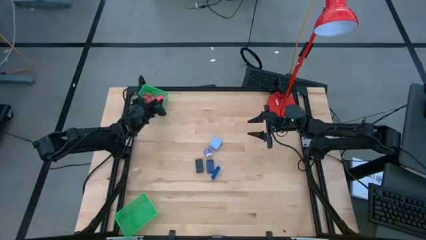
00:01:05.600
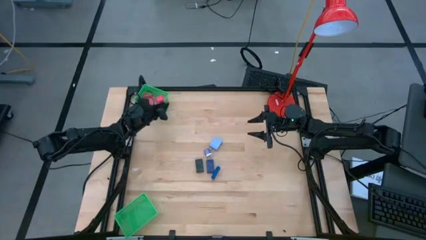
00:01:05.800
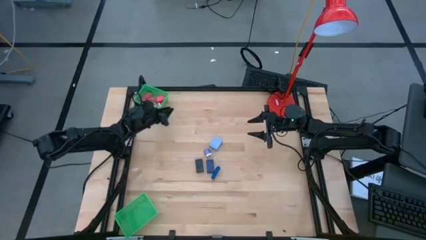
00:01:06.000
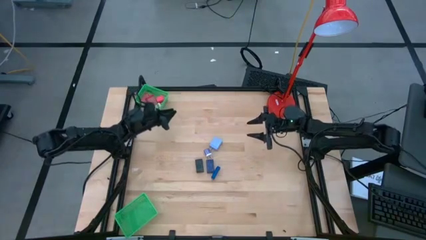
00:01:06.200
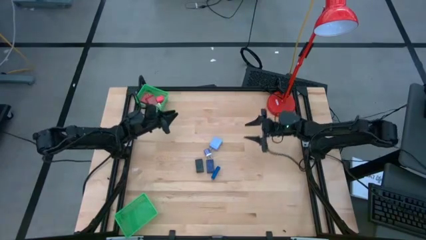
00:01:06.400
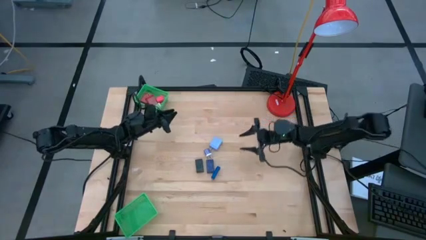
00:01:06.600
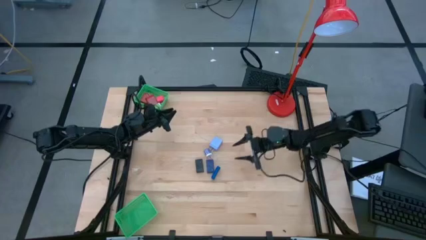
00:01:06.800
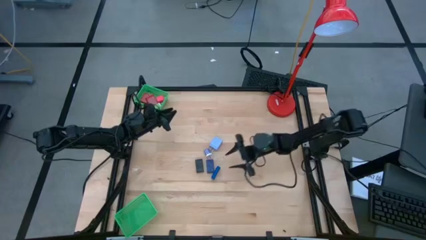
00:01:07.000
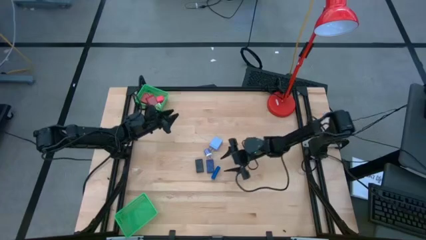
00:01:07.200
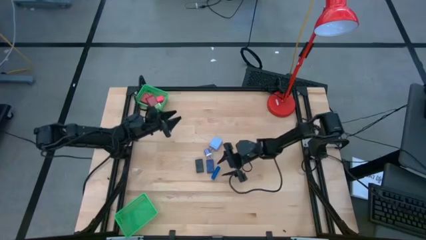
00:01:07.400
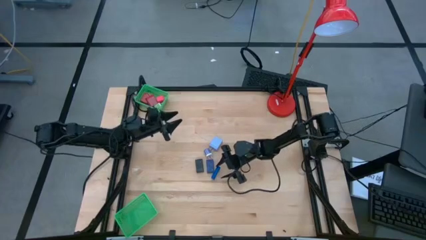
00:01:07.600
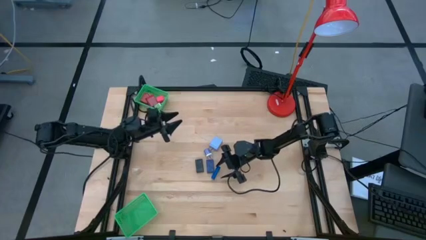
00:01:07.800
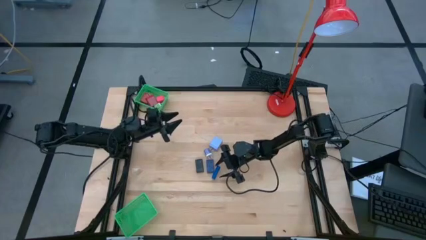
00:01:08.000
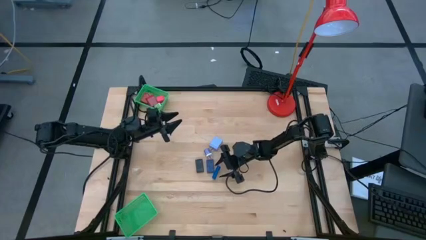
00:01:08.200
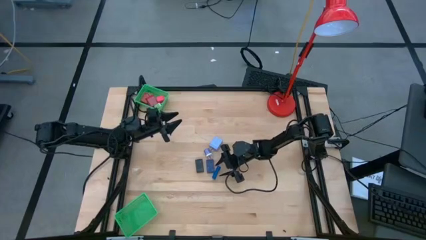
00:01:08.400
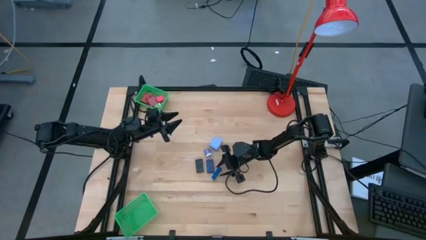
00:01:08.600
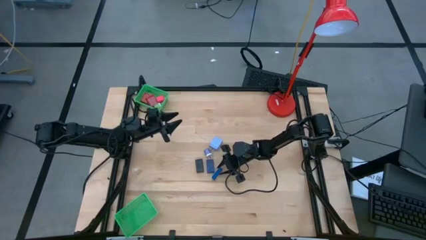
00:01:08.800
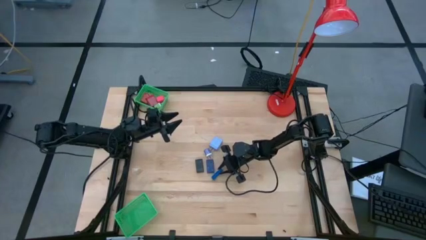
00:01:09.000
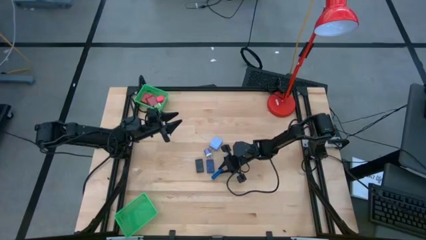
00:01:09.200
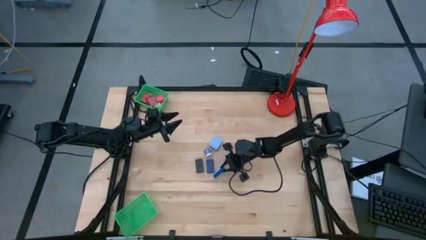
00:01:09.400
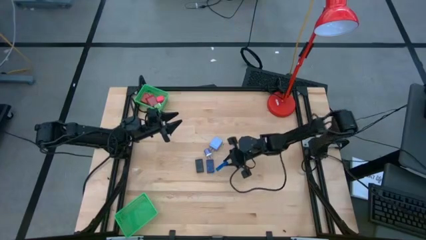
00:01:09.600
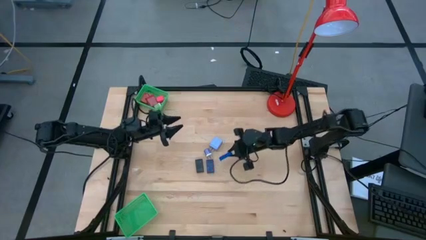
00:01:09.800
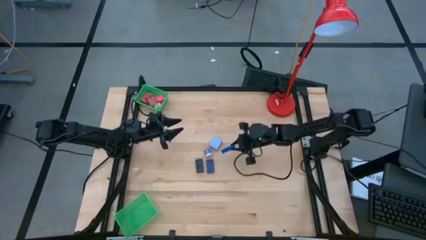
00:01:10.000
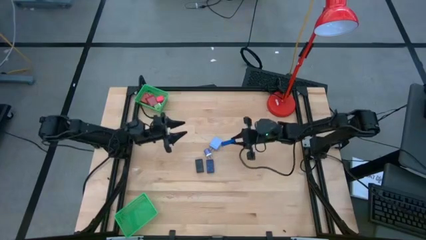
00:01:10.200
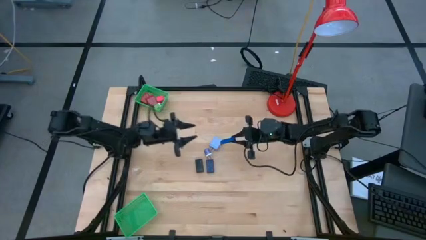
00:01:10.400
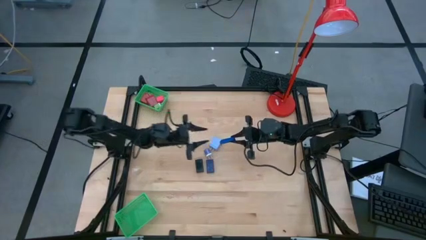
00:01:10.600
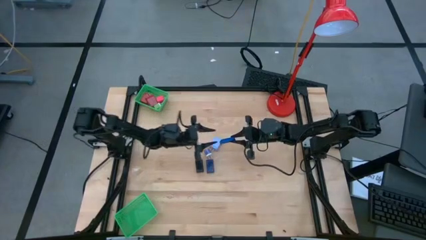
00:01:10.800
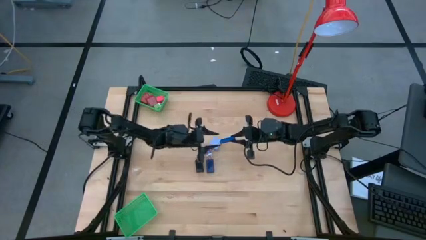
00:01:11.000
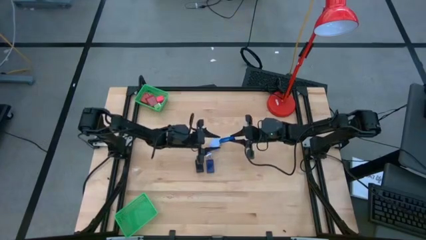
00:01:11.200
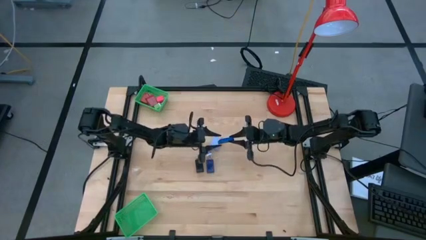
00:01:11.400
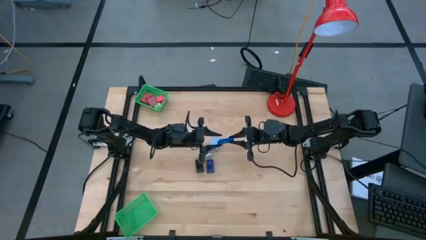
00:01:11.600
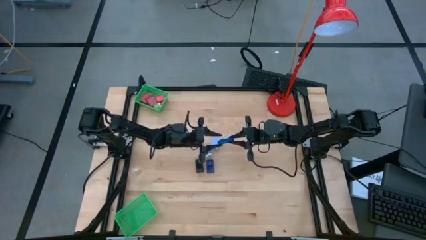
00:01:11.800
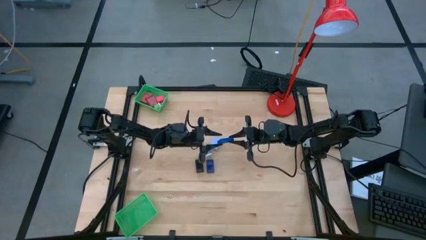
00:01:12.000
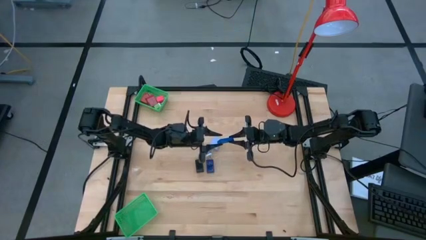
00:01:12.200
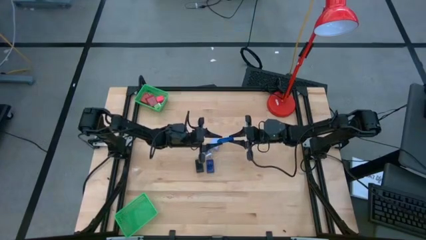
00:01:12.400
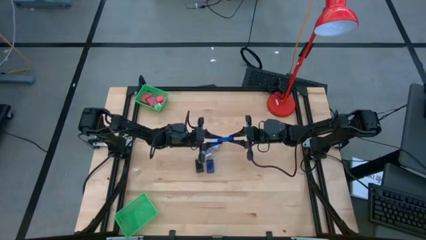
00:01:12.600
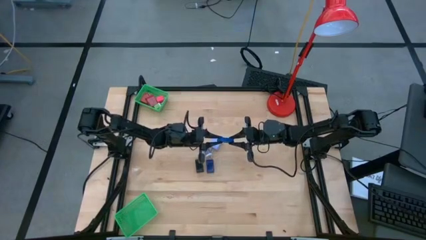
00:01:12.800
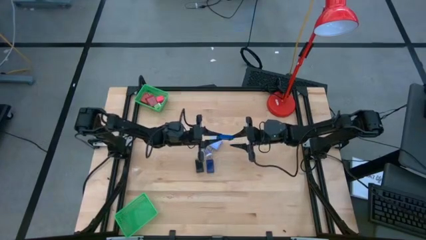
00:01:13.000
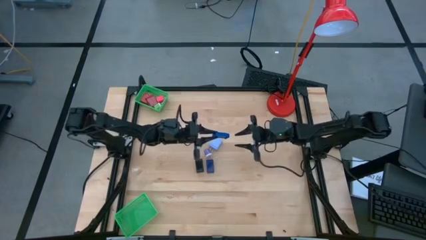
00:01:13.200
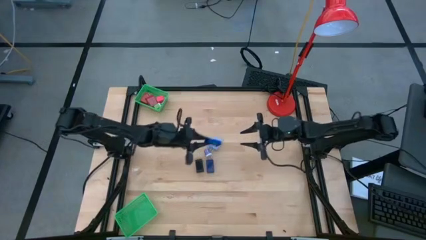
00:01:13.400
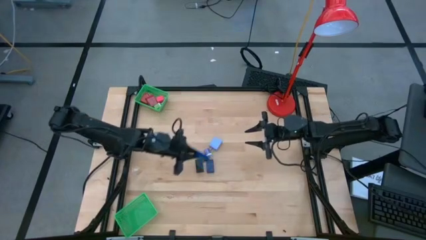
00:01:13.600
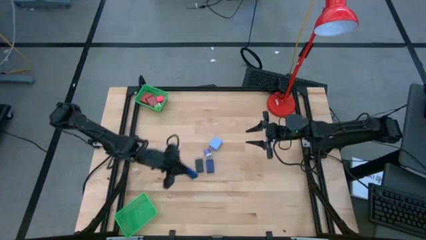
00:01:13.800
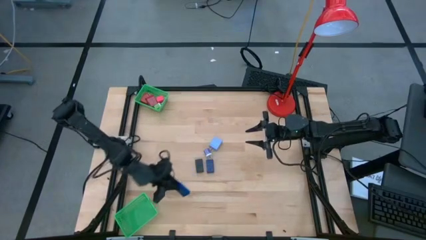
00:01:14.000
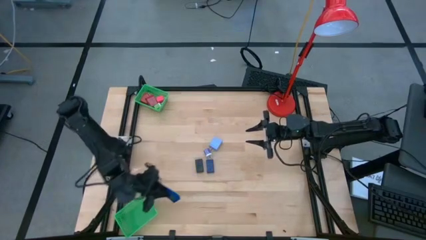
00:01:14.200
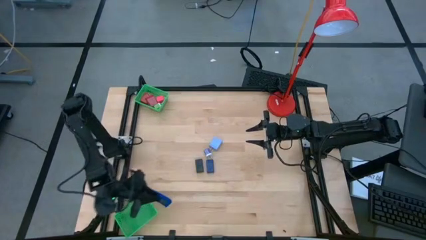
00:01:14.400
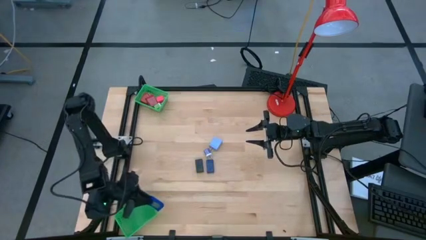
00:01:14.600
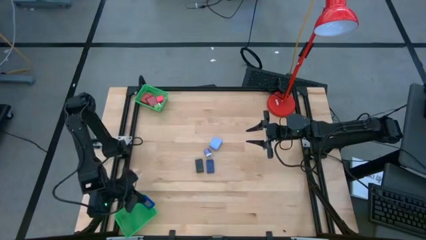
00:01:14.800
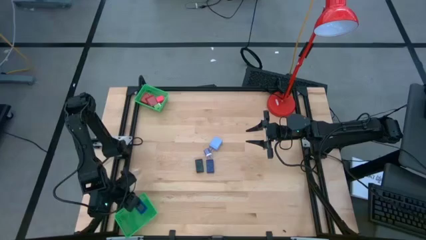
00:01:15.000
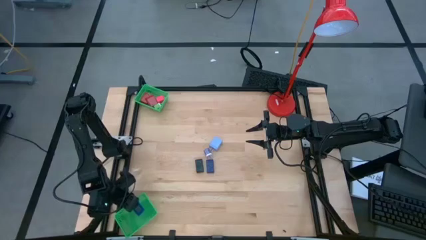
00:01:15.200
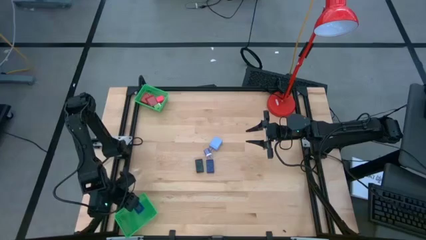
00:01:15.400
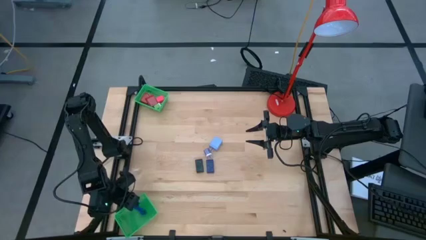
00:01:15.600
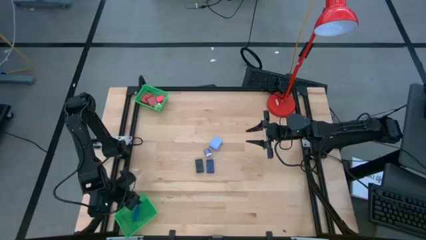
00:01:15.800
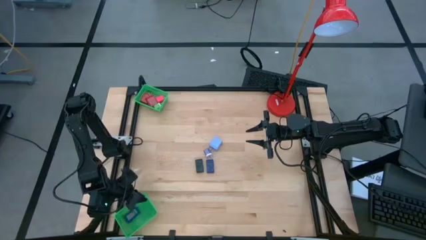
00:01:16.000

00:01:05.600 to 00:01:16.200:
Task: Pick & Place Office items
Put the light blue digital timer into the bottom green basket
